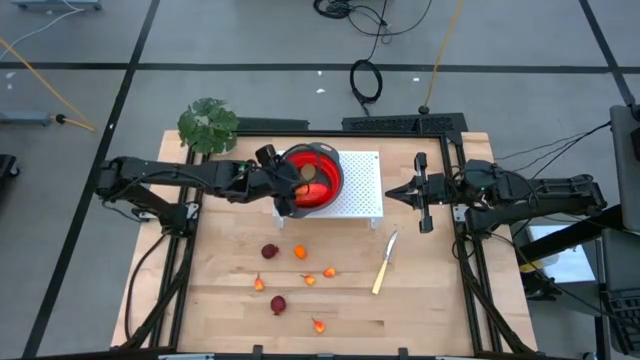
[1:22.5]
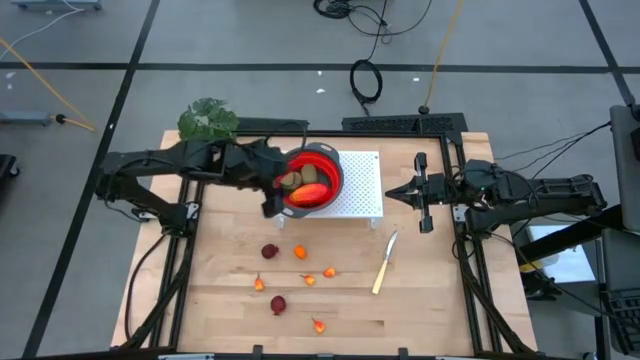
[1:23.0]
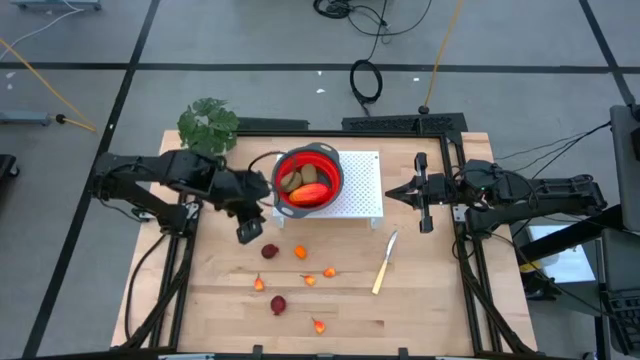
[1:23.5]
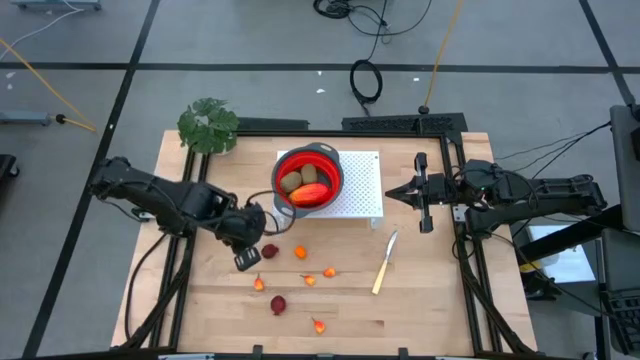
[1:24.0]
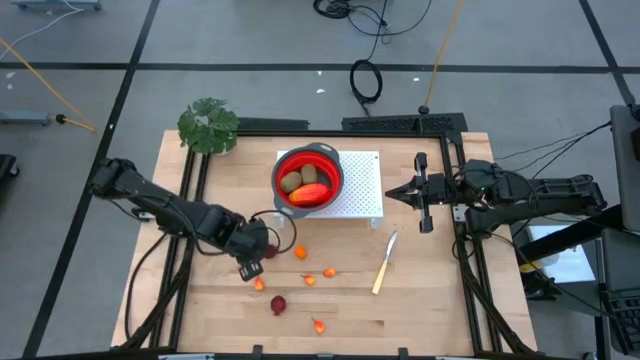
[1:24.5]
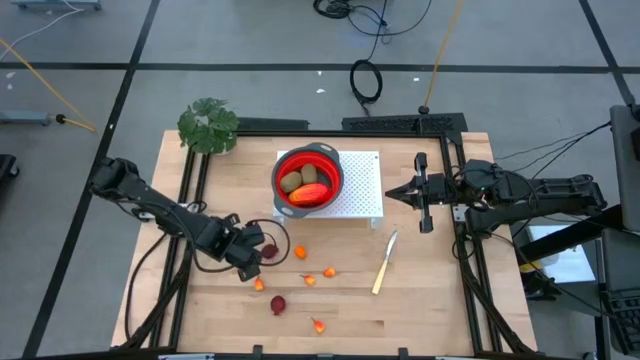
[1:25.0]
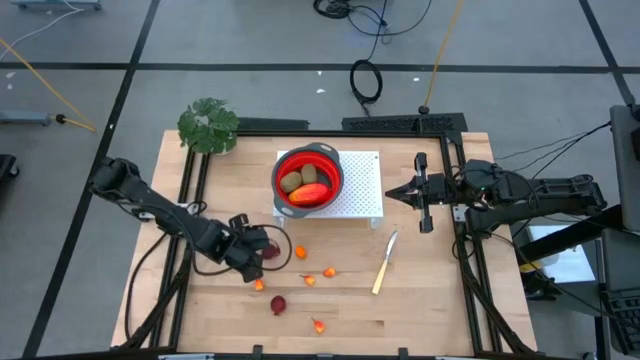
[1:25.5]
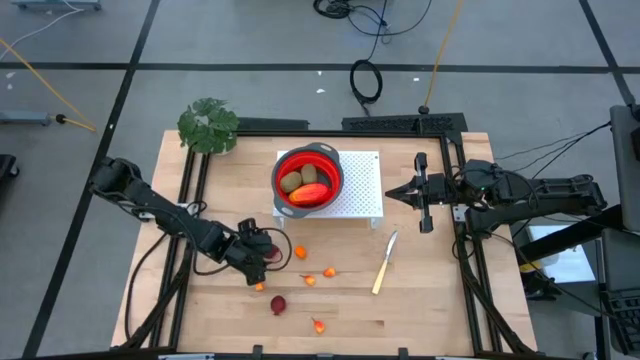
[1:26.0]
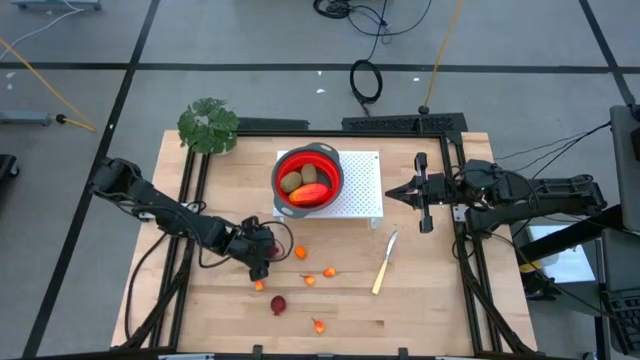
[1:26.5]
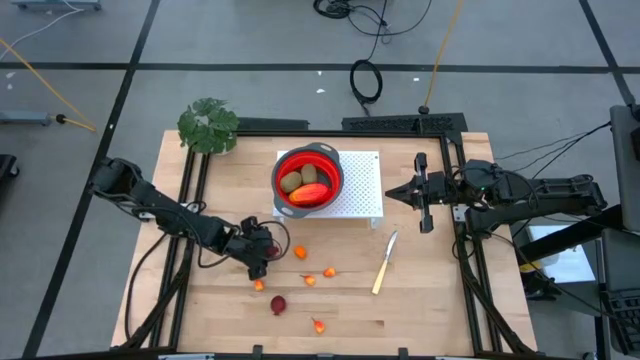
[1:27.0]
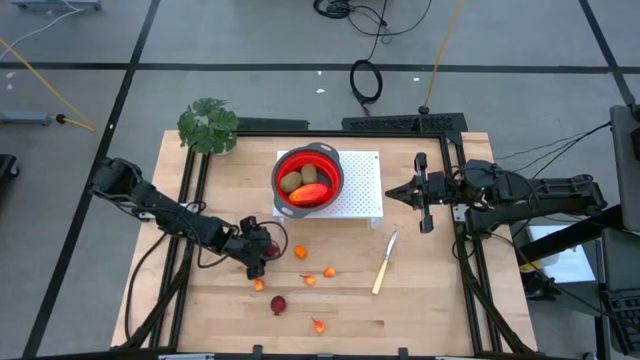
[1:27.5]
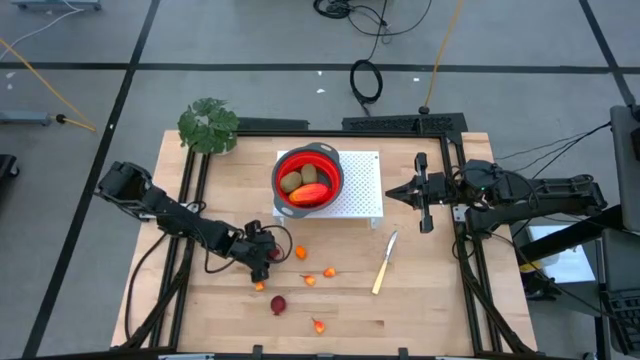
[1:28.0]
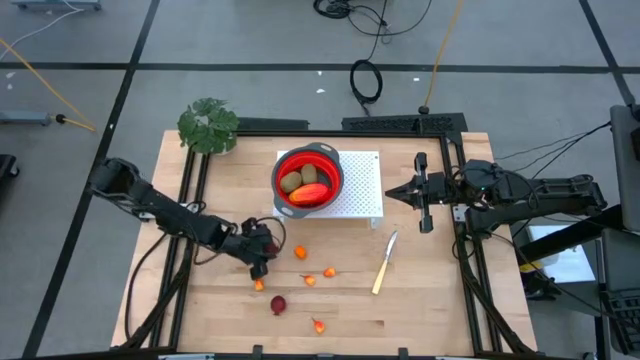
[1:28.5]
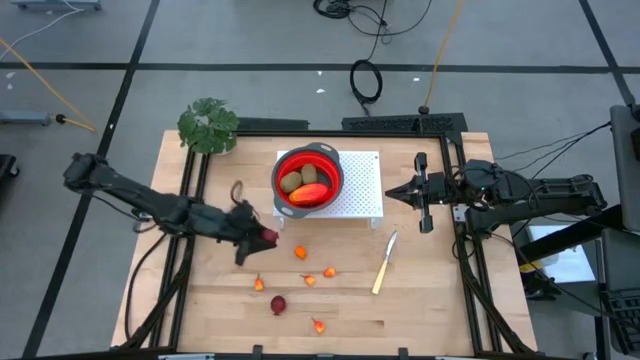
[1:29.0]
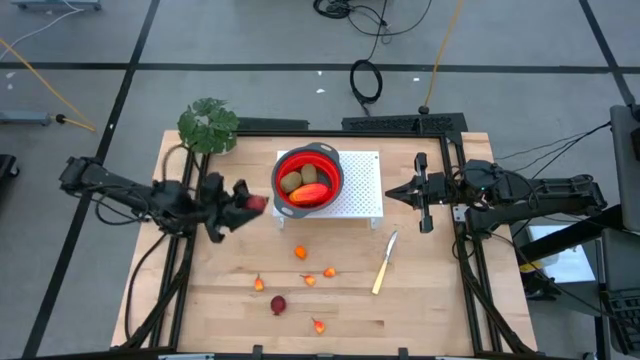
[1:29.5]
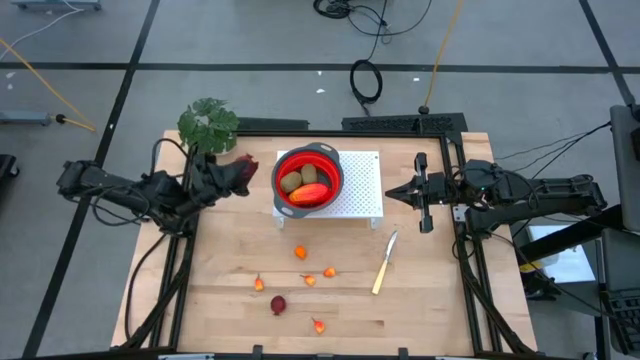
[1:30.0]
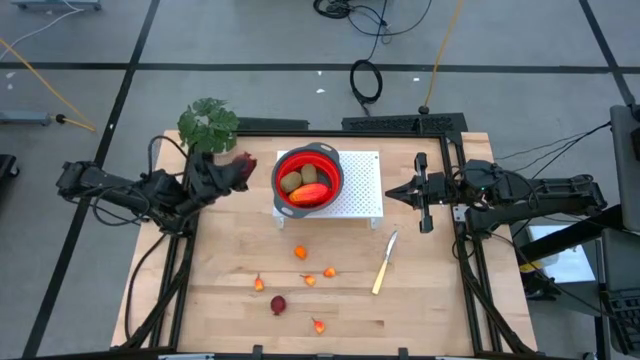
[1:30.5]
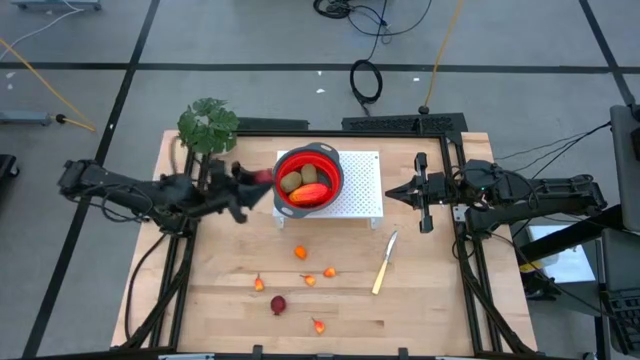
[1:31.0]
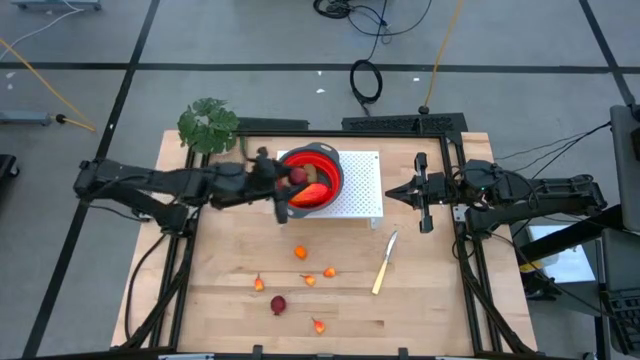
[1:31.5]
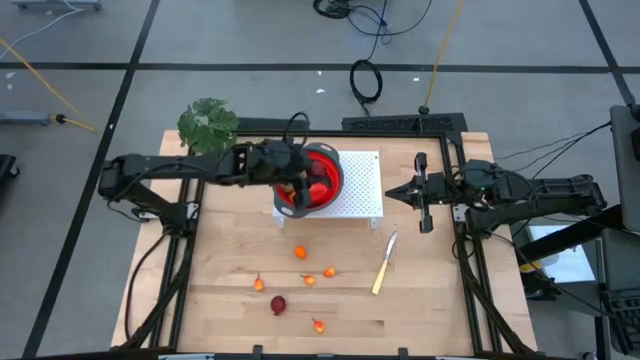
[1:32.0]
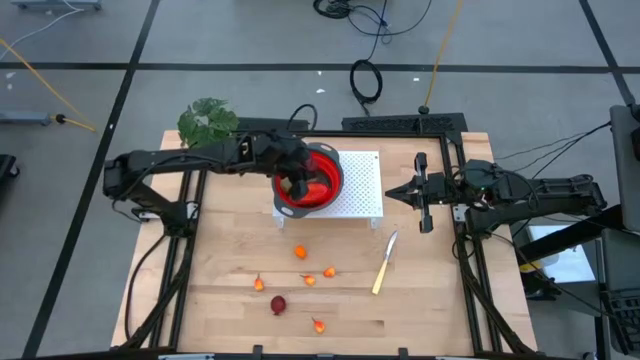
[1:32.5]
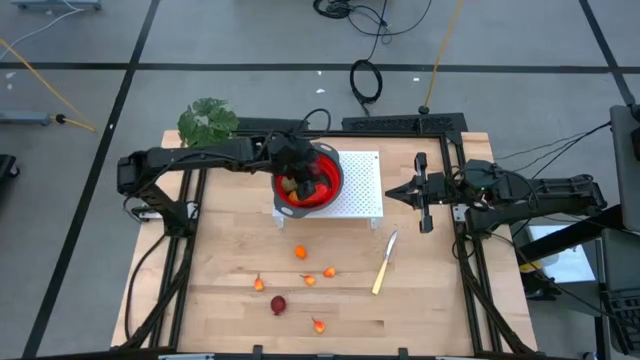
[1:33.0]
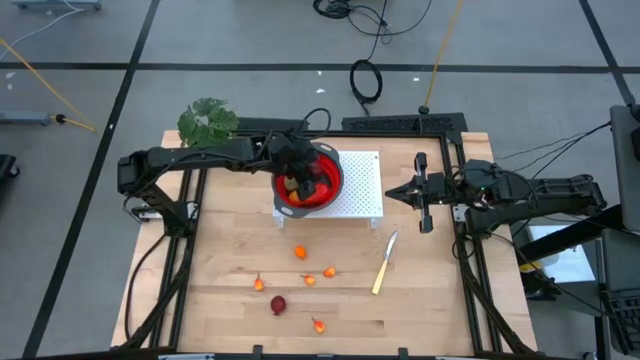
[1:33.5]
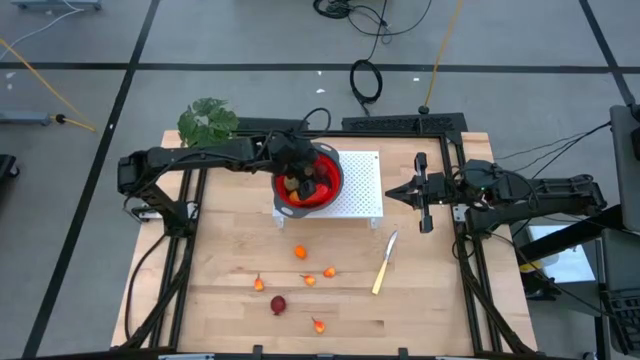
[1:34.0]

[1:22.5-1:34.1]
Task: Pick & Place Fruit
Put the red pomegranate into the orange strainer bowl on the shelf

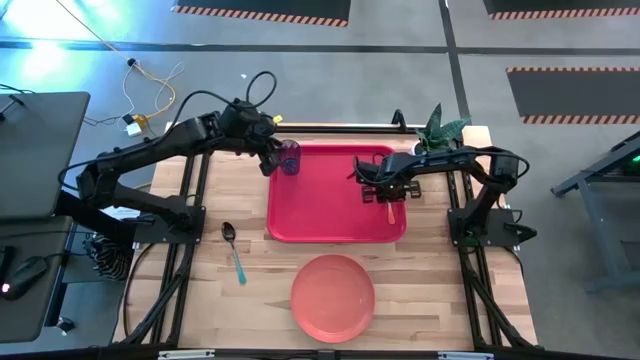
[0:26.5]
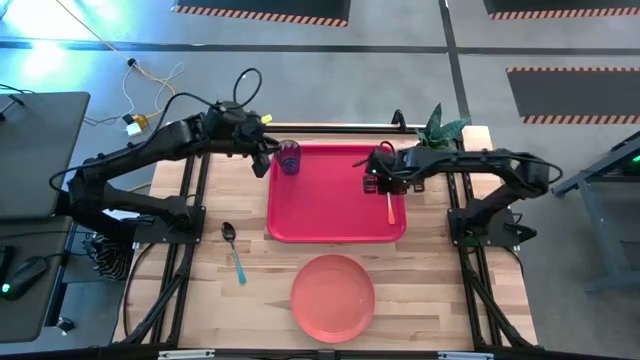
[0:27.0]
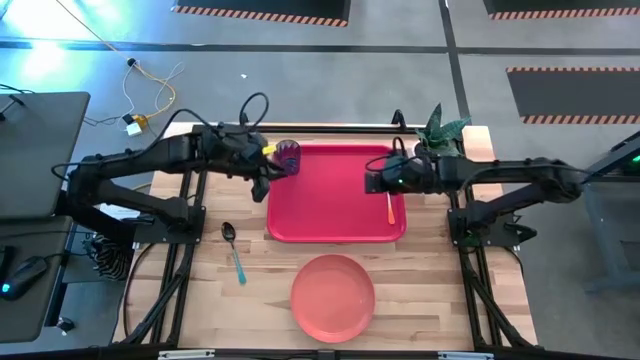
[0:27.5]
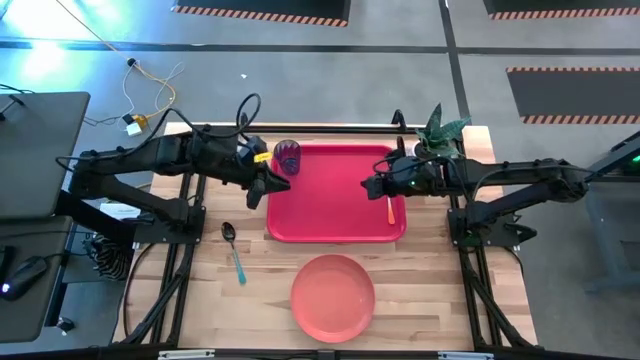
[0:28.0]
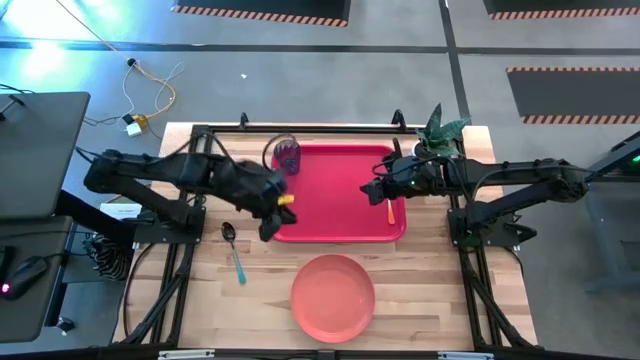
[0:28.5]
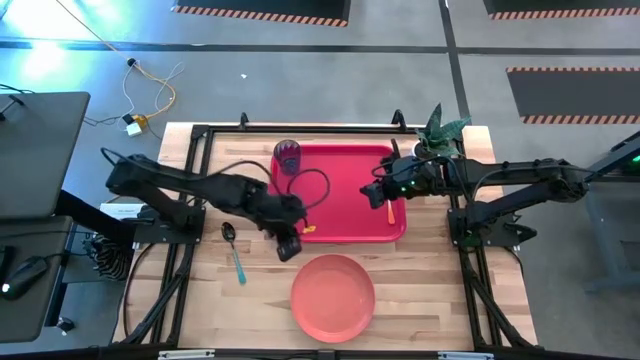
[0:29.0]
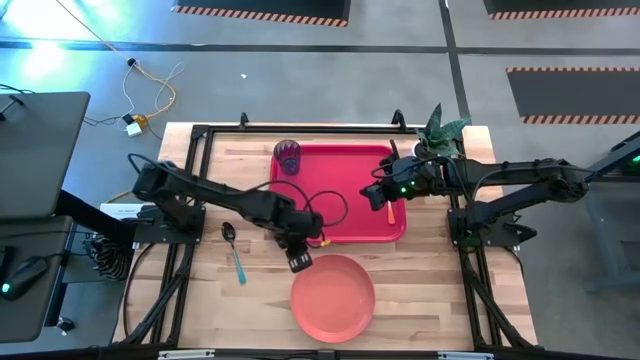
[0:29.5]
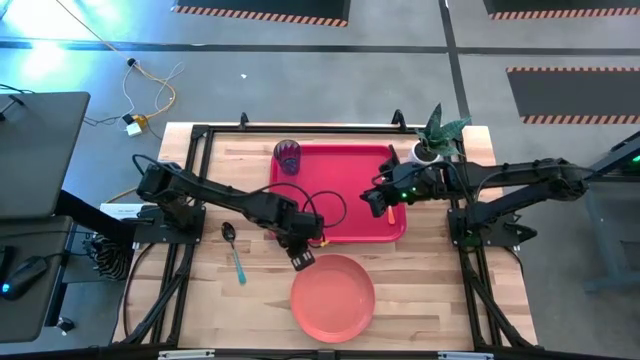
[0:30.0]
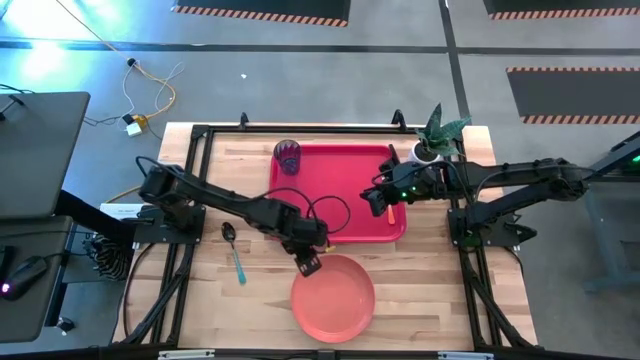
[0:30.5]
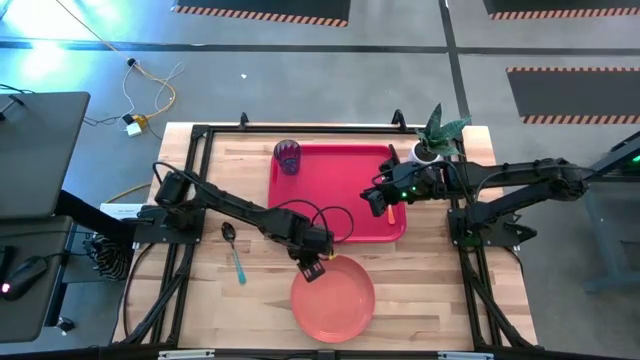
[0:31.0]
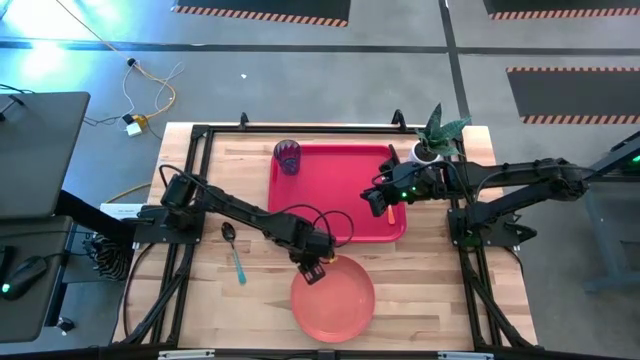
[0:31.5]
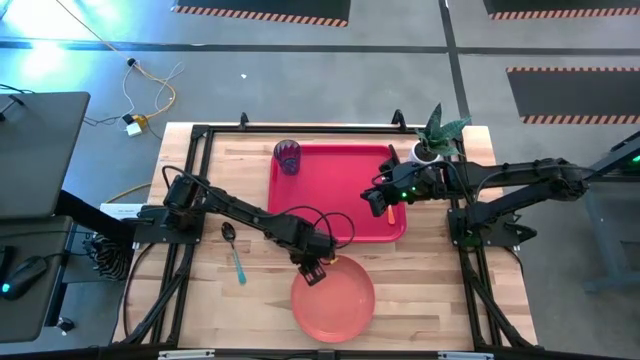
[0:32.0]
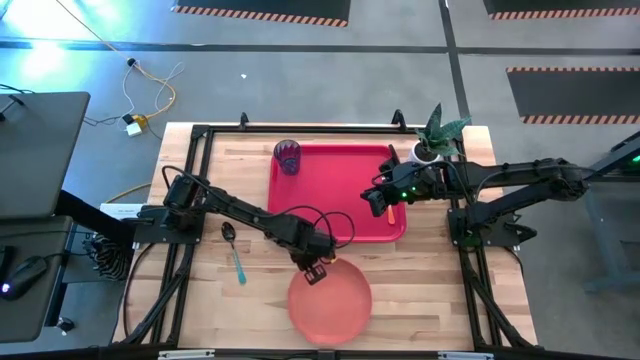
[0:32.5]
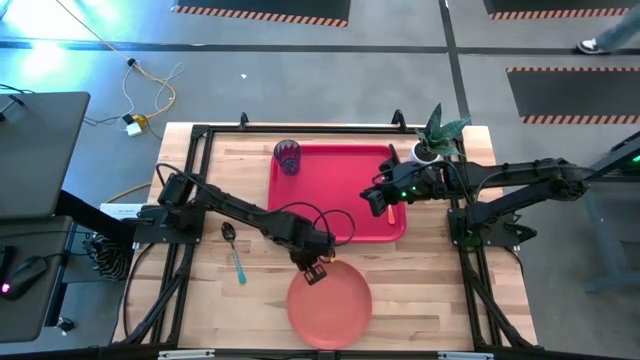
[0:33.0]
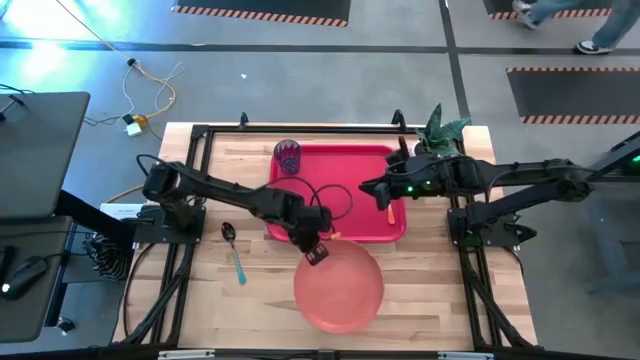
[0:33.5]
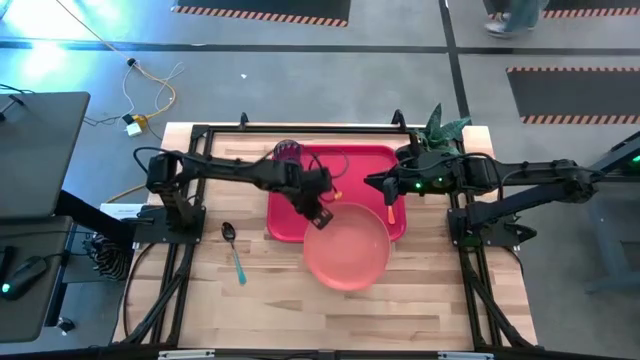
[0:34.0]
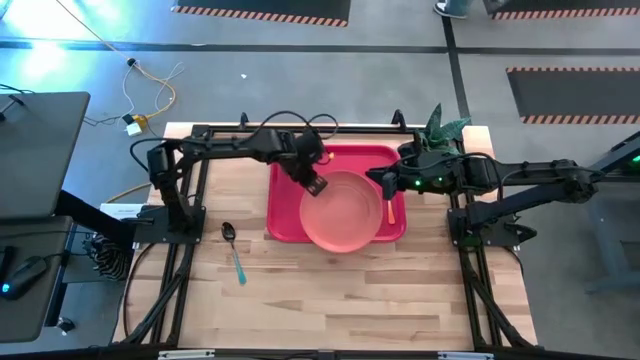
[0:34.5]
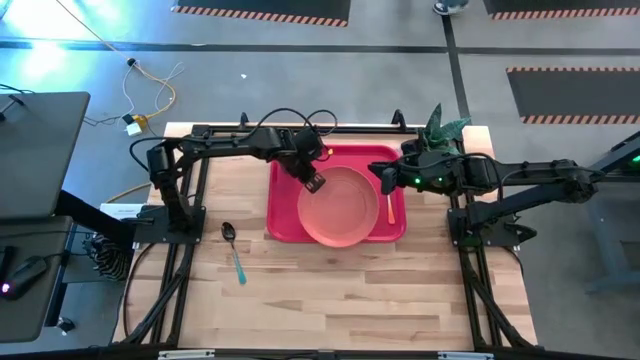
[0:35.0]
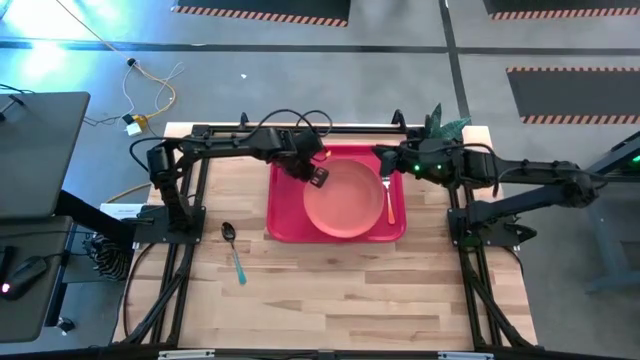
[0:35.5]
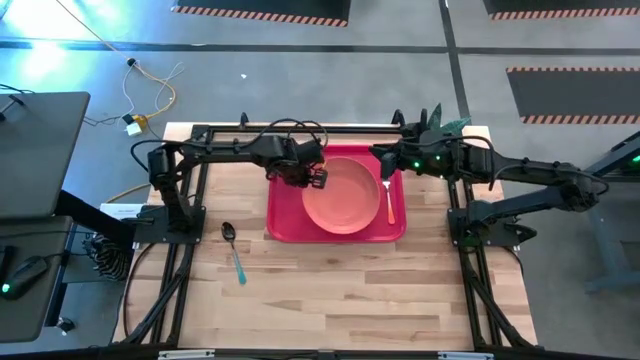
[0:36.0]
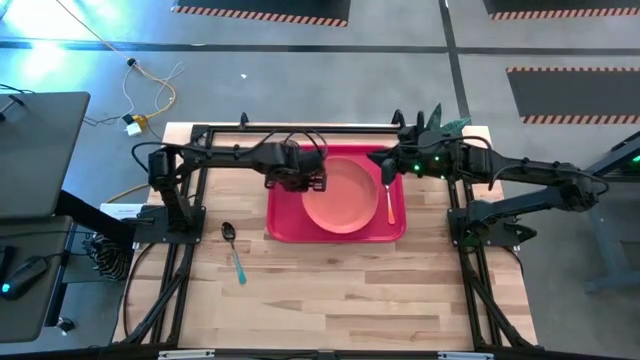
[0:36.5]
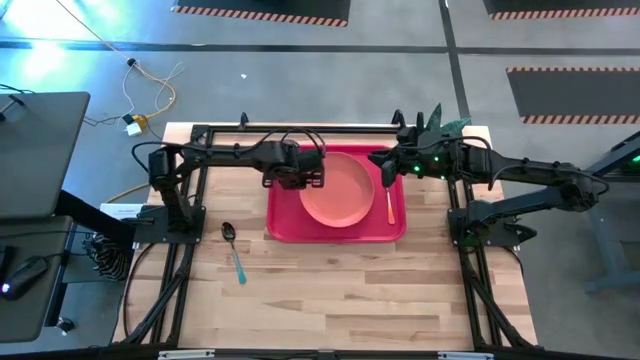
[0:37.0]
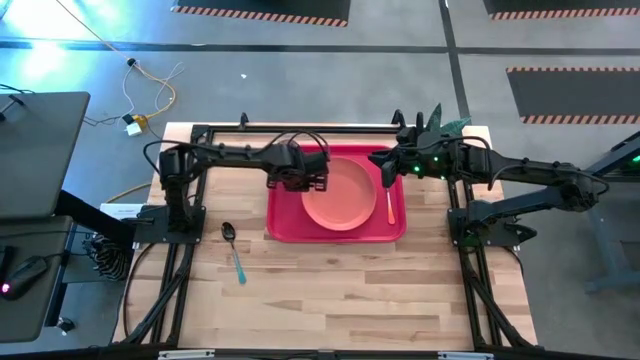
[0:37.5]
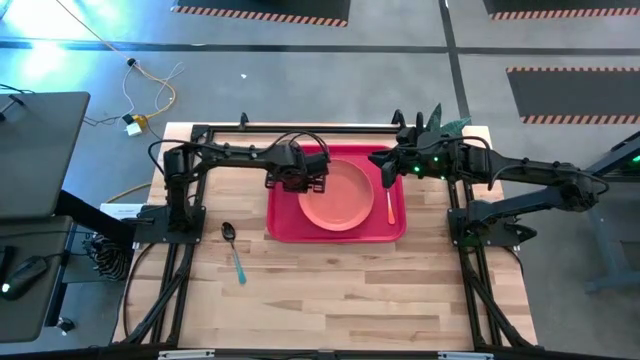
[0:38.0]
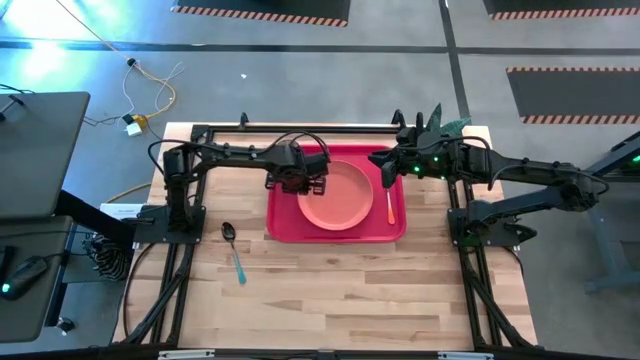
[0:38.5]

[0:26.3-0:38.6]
Task: Pick and place plate/cup/fork/spoon on tray
Put the orange plate on the red serving tray to the left of the orange fork
